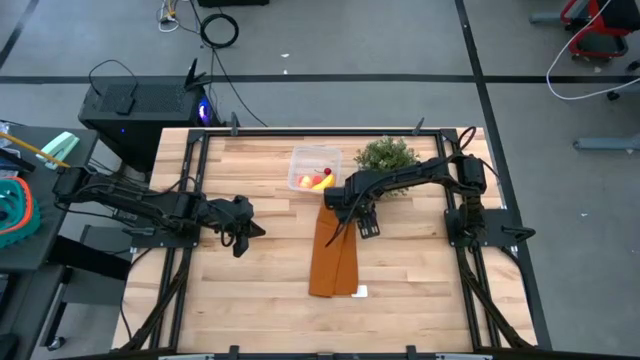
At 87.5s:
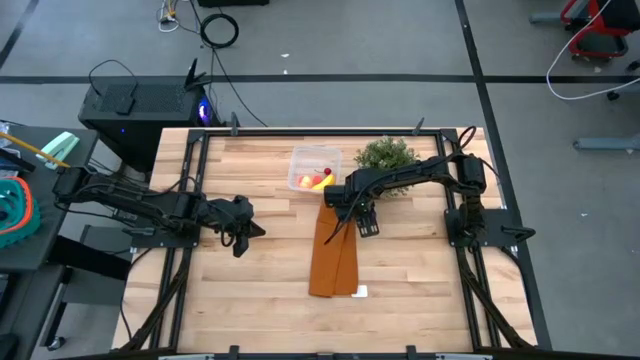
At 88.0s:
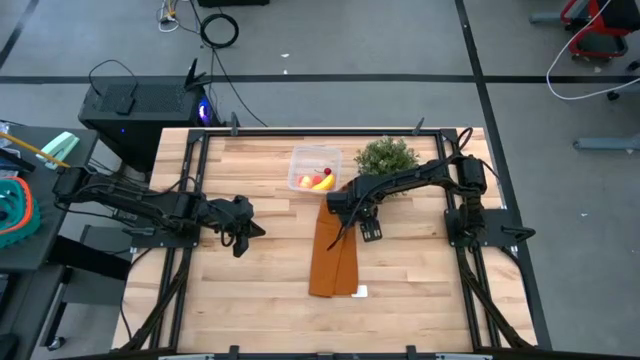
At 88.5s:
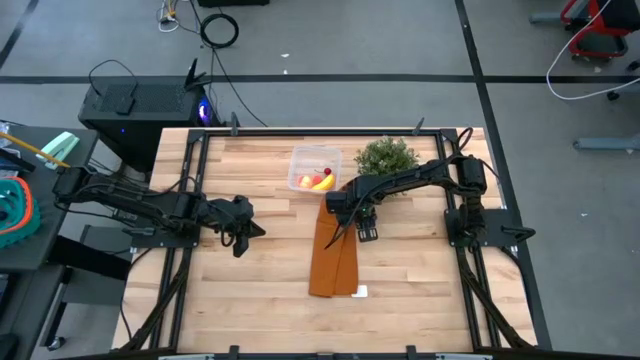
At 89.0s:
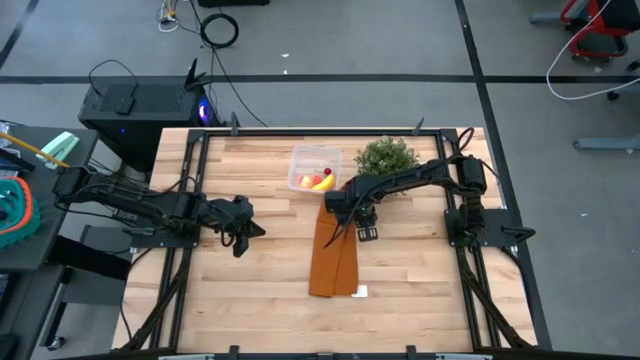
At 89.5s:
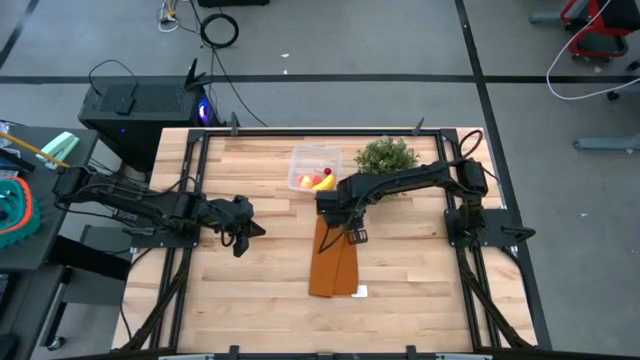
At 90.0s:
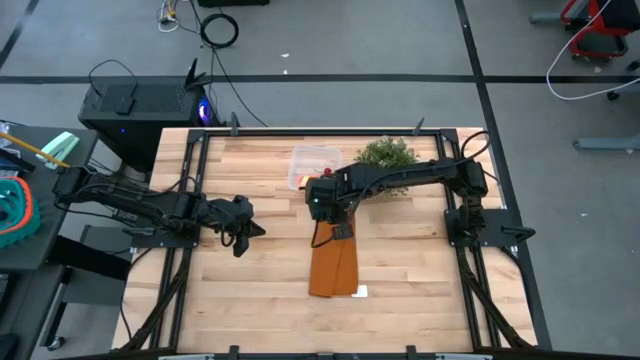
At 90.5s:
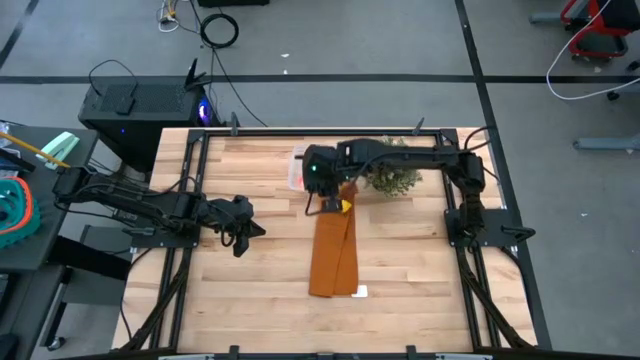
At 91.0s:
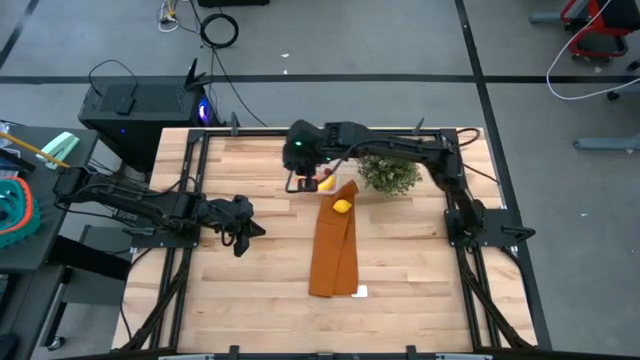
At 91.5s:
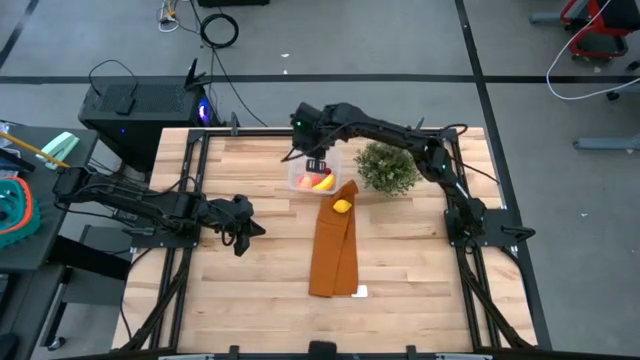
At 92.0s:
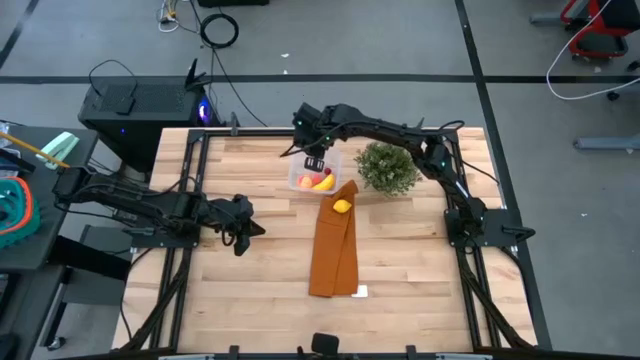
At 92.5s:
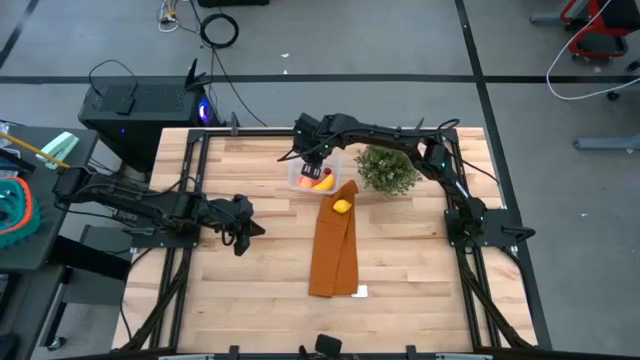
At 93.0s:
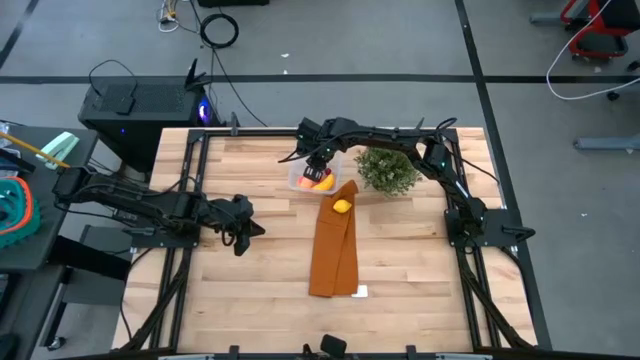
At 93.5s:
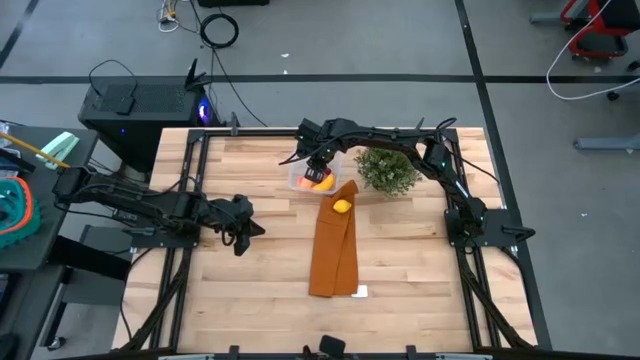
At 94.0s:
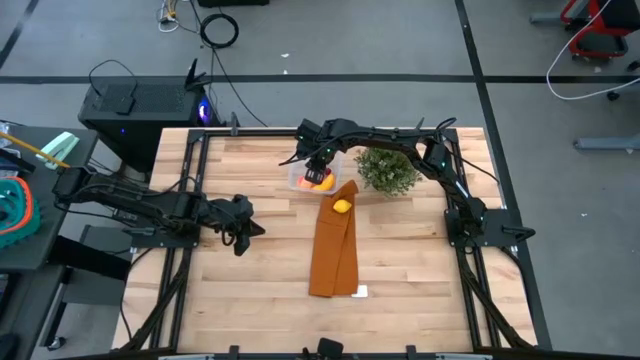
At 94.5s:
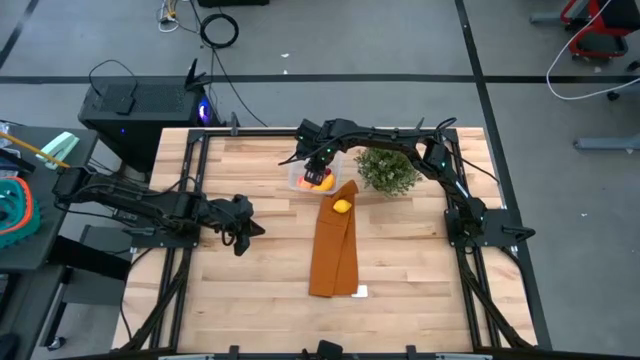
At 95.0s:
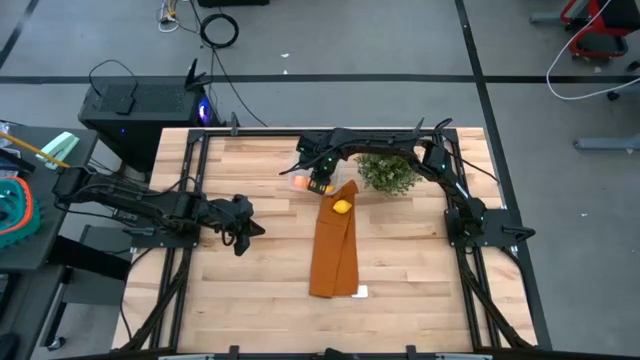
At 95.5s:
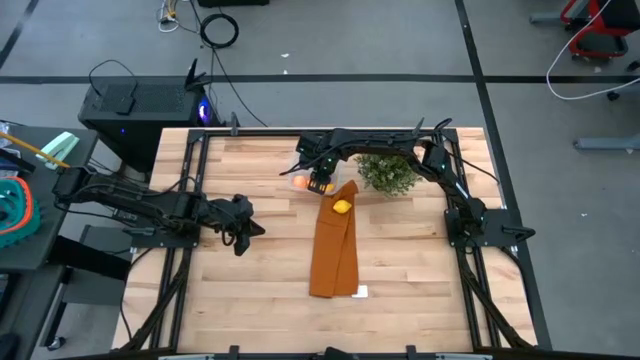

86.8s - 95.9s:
Task: Pick and placing Produce into tupperware
Put the purple eggplant into the transparent bin

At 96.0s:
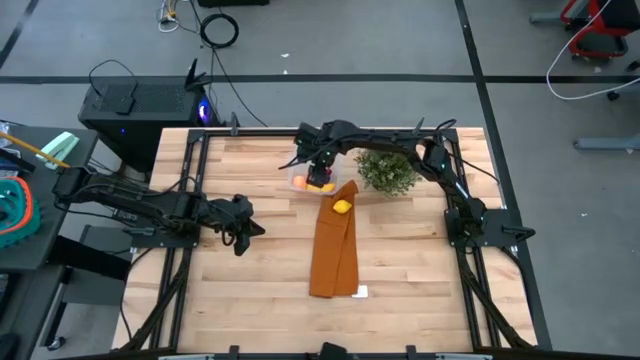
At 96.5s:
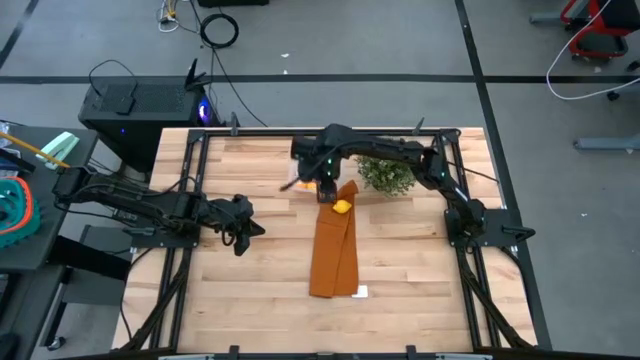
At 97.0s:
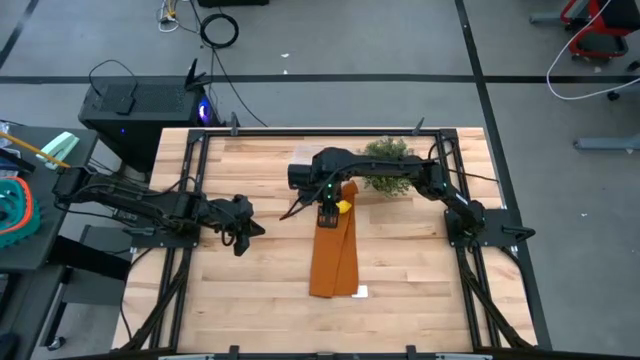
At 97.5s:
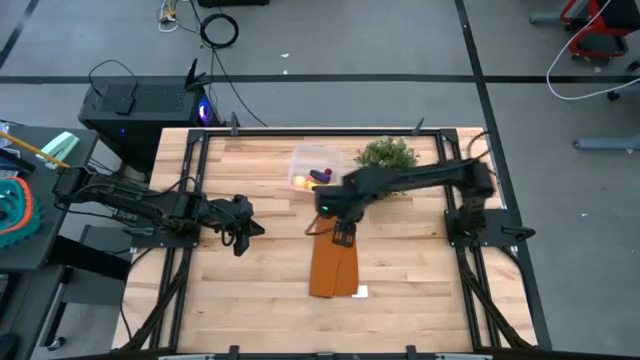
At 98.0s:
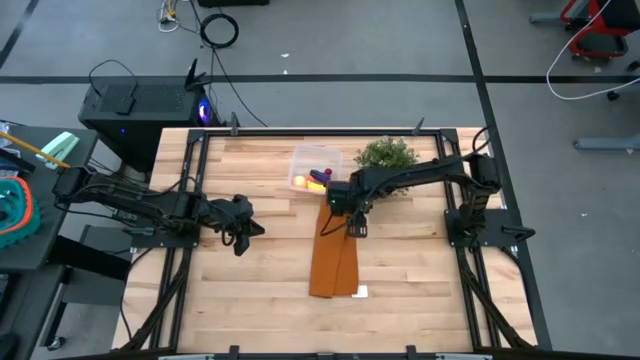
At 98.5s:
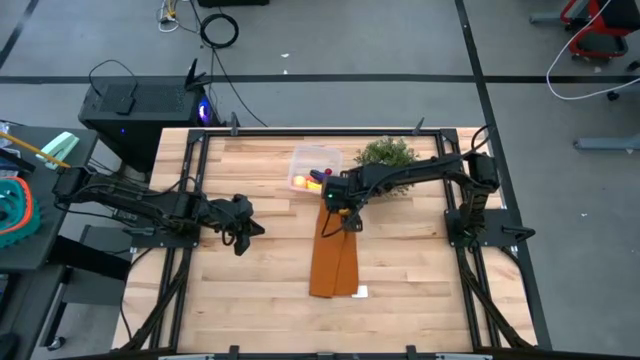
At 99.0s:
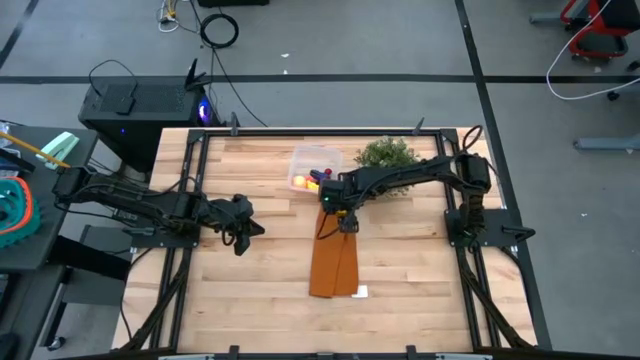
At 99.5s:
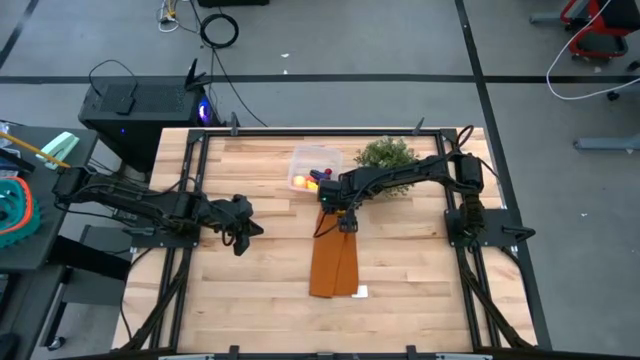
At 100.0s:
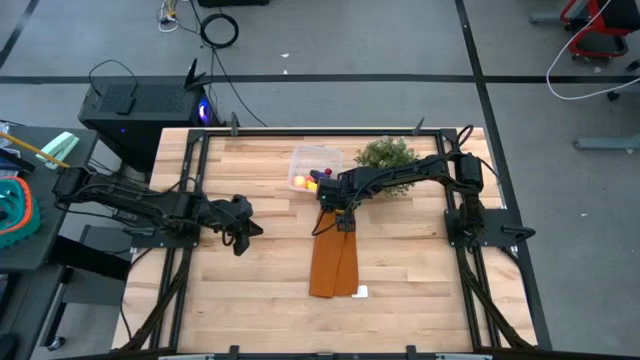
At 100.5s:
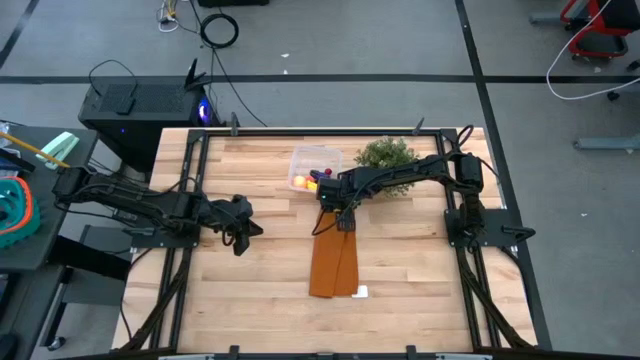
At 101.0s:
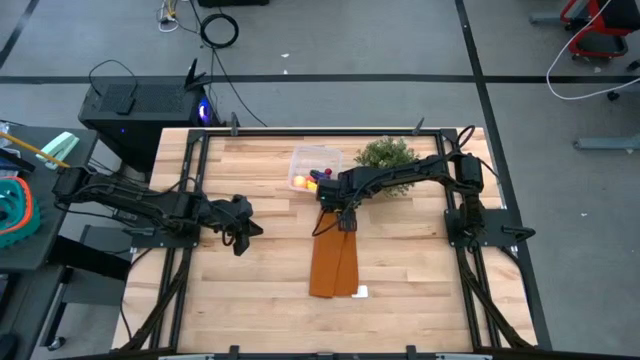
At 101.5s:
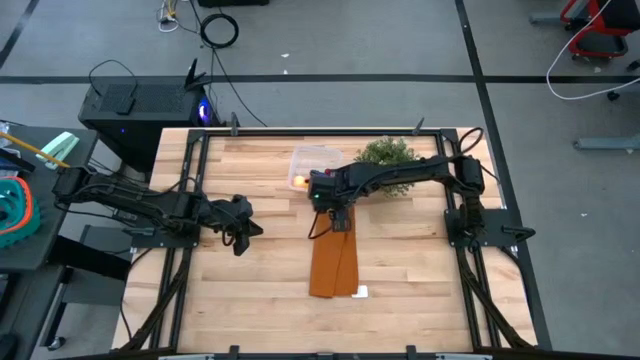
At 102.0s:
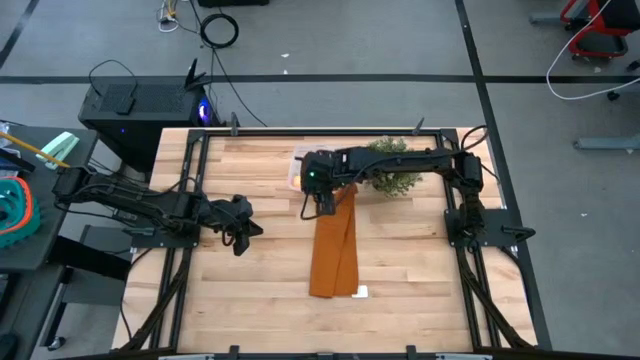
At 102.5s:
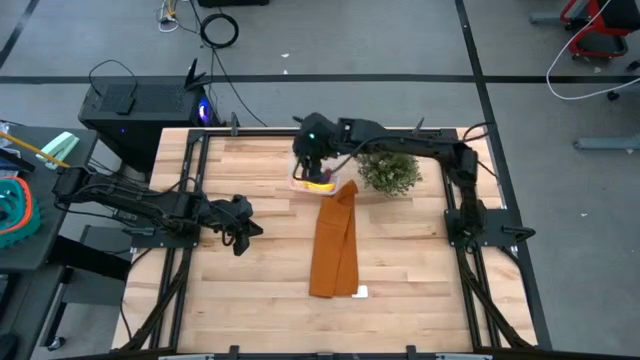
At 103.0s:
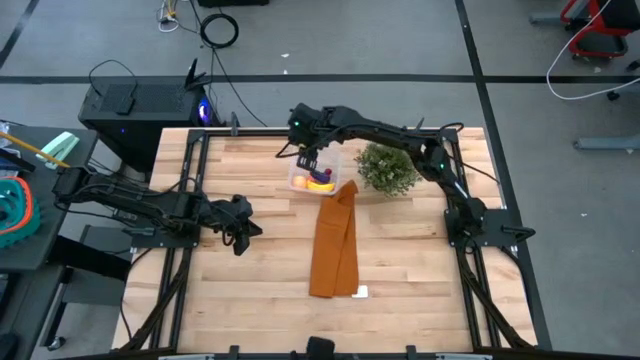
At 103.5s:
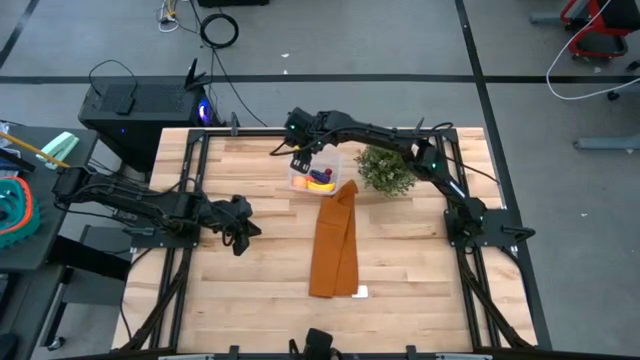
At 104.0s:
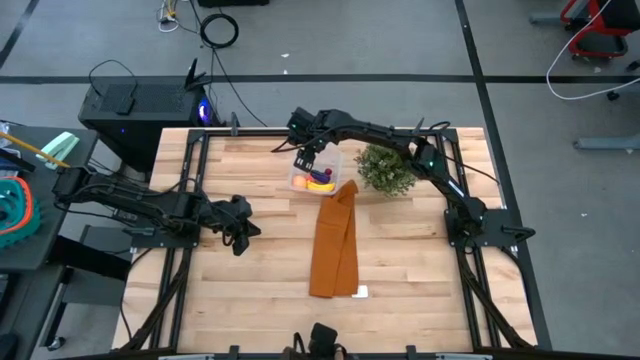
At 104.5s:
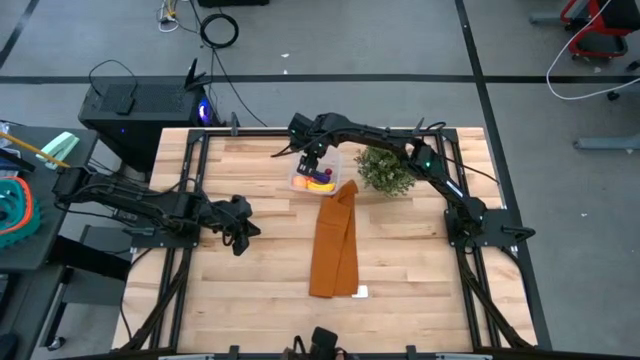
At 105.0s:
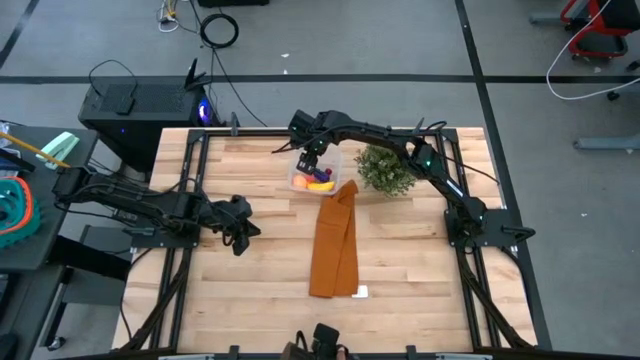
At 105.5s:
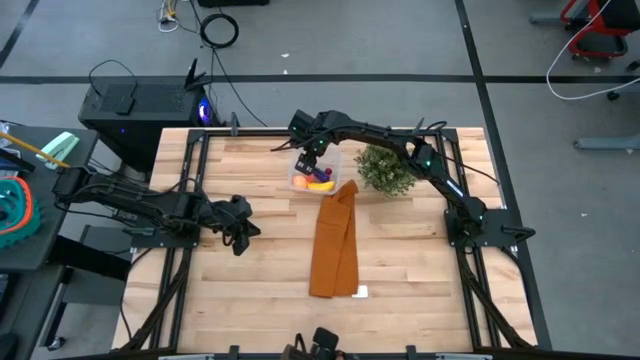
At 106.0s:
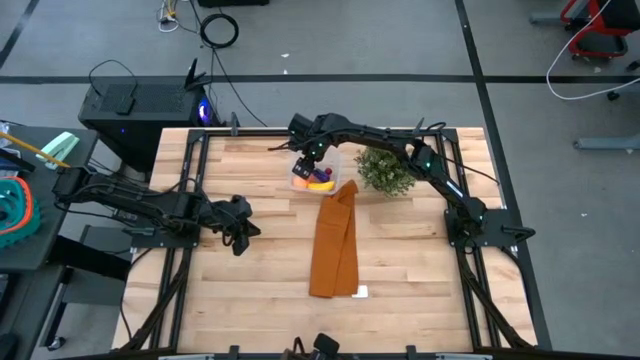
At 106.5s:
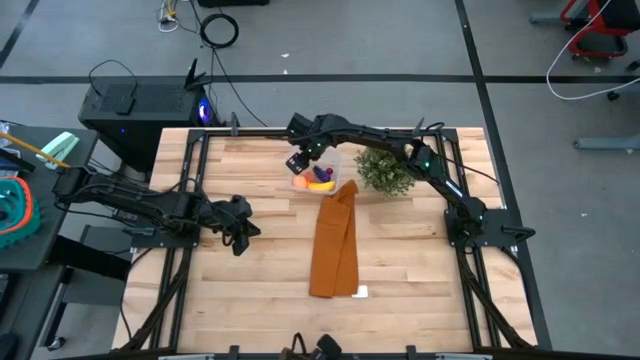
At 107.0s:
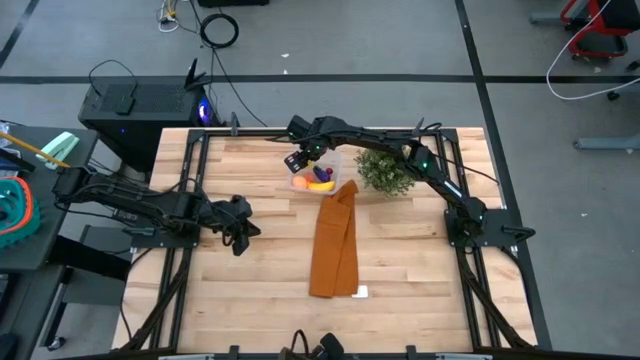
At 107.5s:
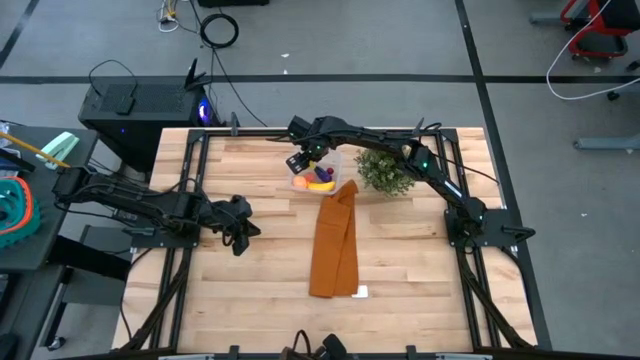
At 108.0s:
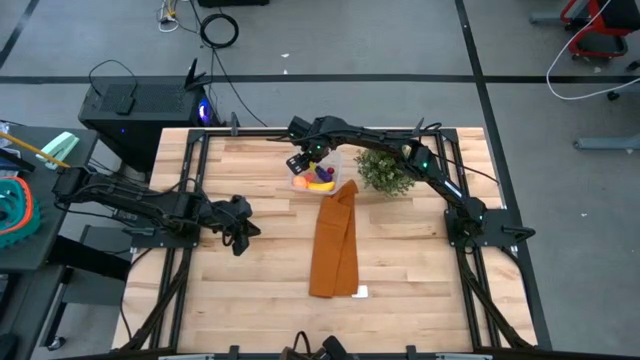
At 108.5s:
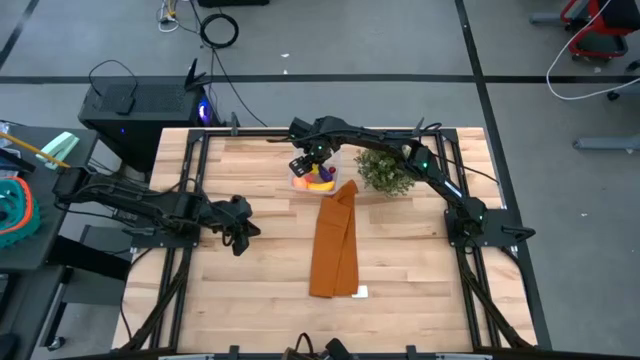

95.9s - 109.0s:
Put the yellow lemon into the transparent bin
